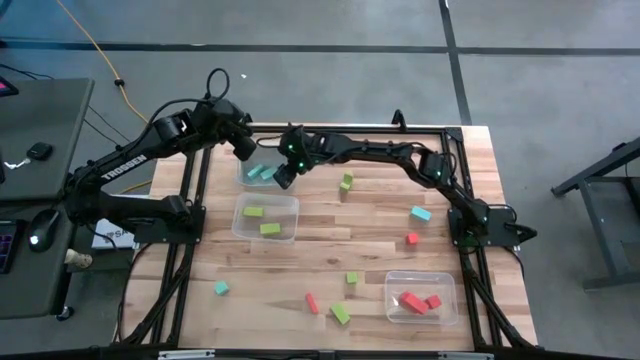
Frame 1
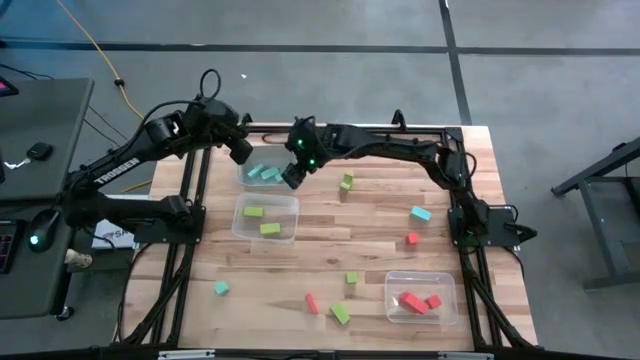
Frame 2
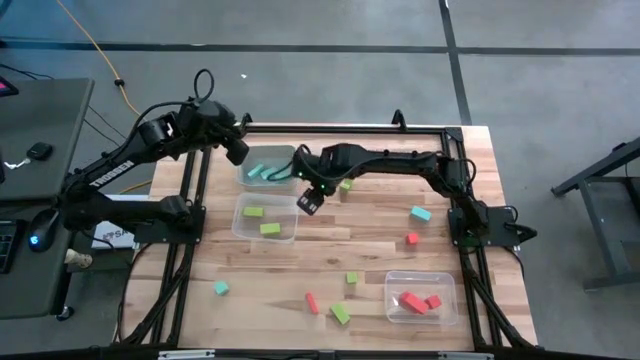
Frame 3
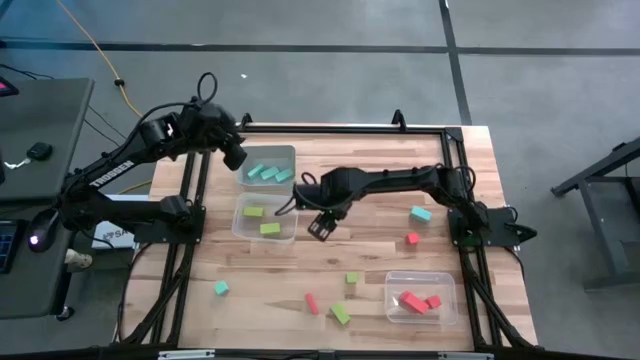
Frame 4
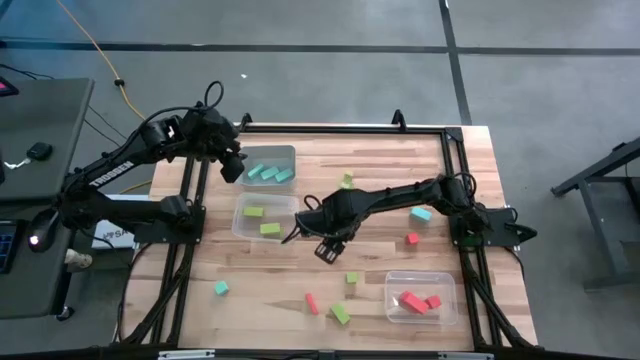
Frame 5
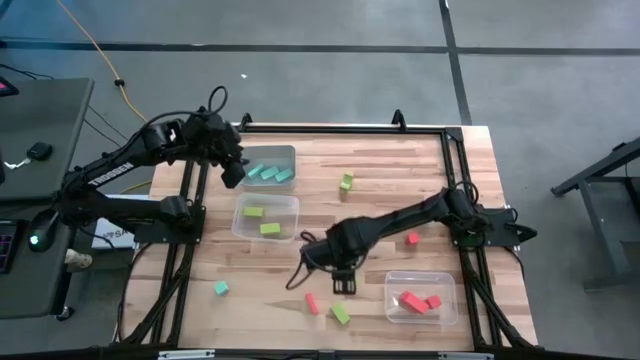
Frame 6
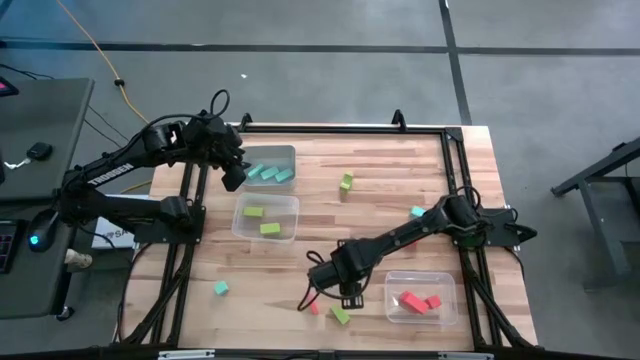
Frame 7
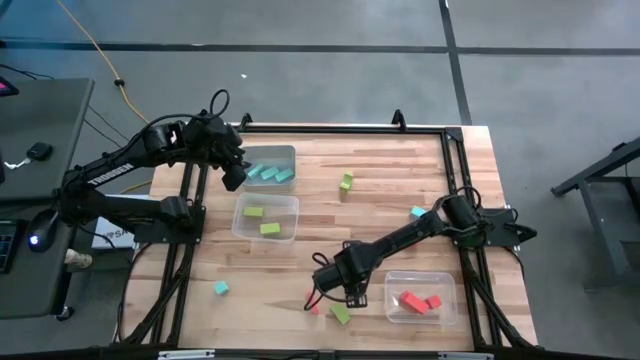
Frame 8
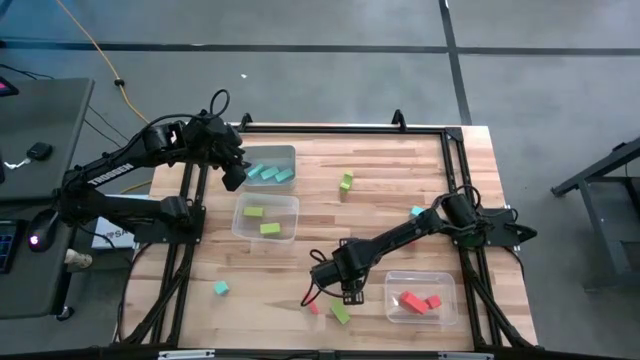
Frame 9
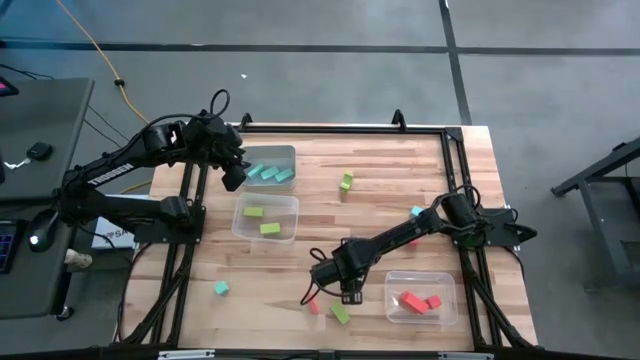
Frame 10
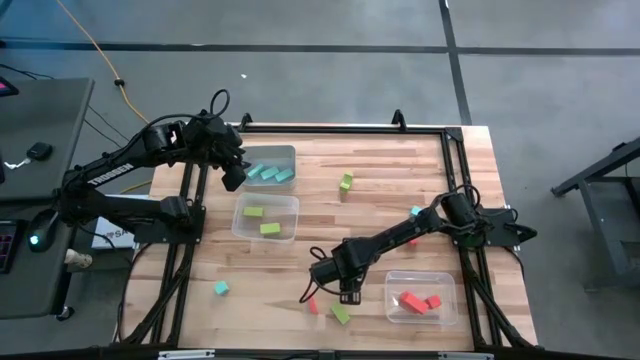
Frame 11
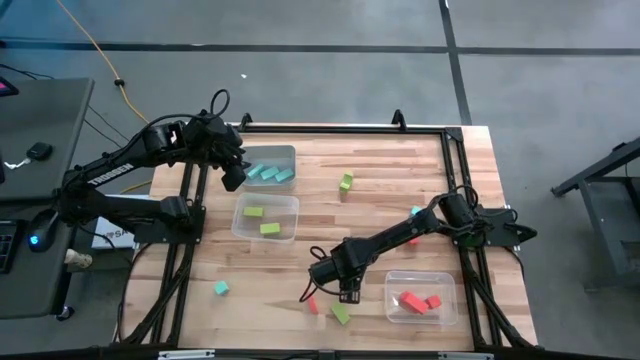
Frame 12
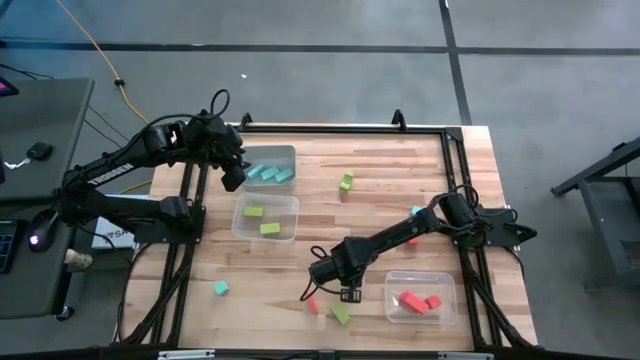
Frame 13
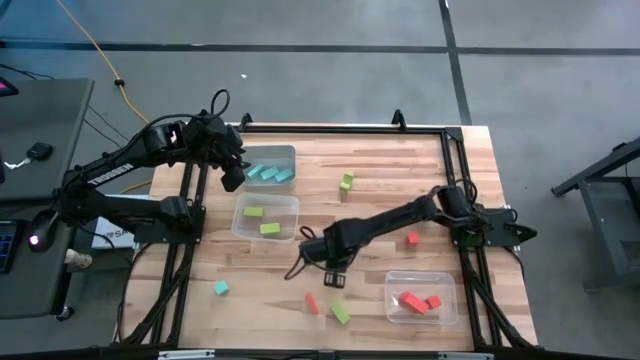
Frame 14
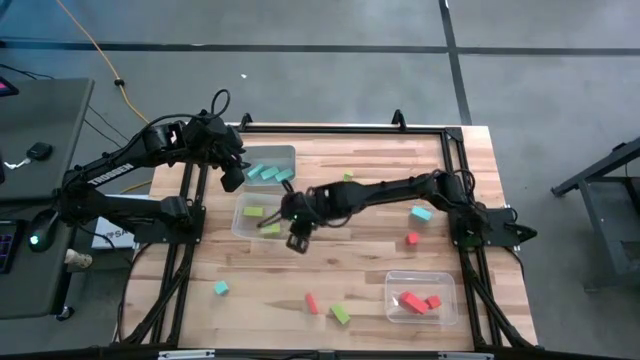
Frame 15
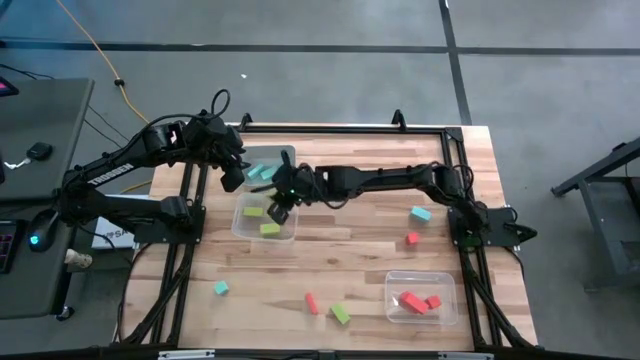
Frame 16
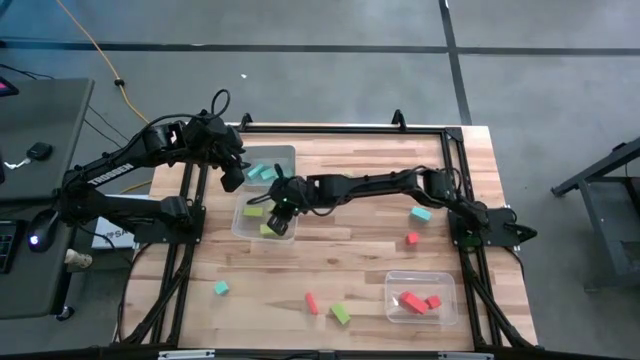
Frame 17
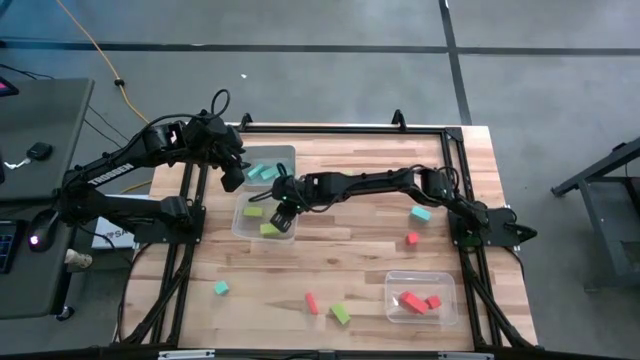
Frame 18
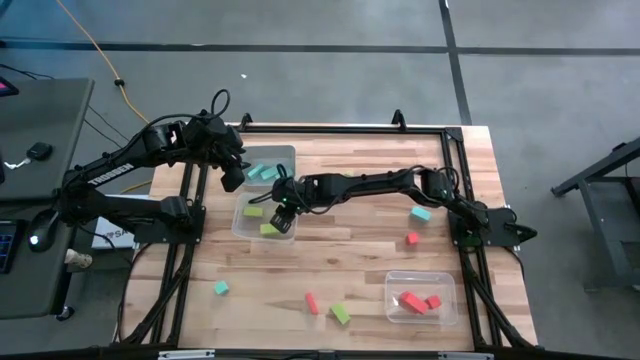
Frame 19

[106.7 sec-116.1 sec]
Task: Sort & place blocks by color
Put the green block into the left transparent bin

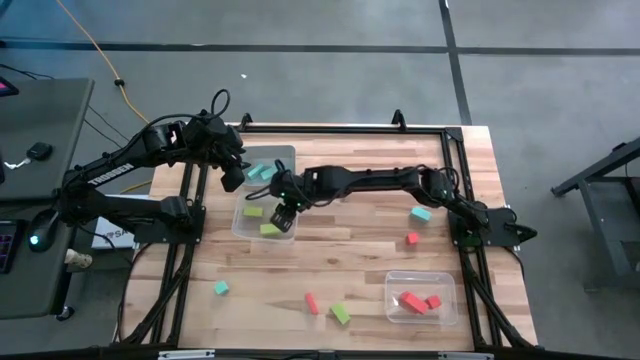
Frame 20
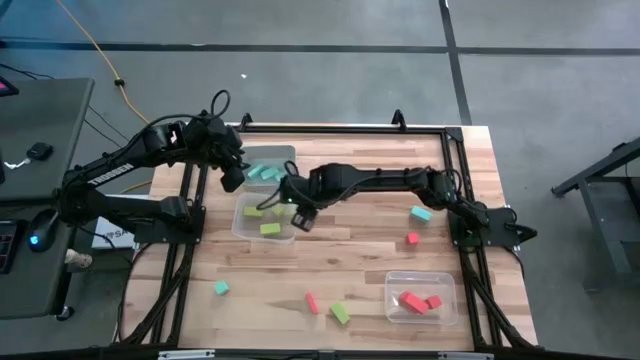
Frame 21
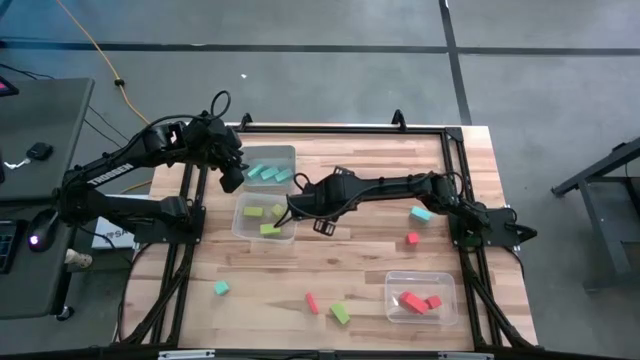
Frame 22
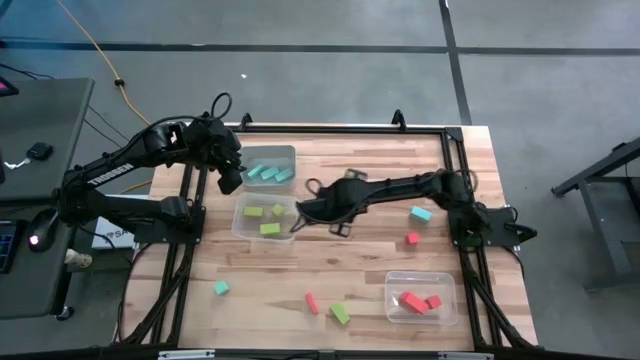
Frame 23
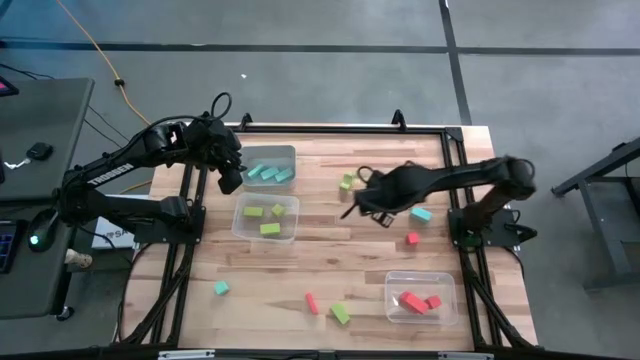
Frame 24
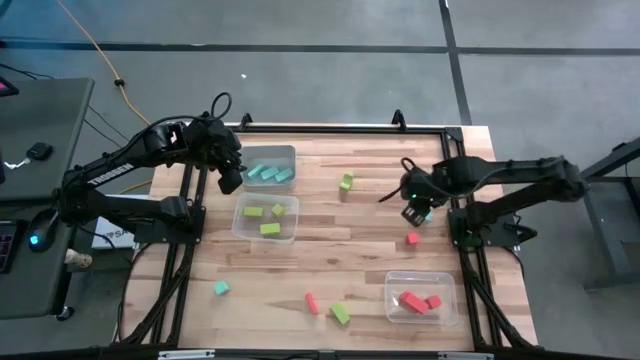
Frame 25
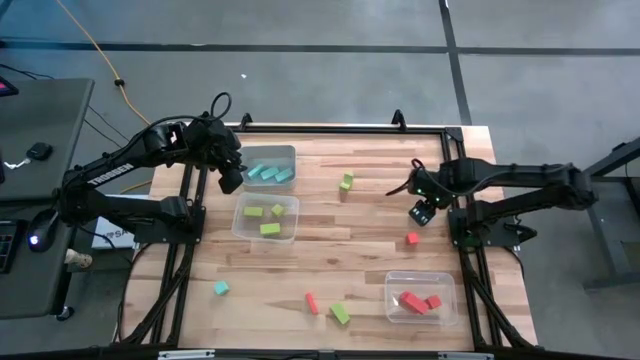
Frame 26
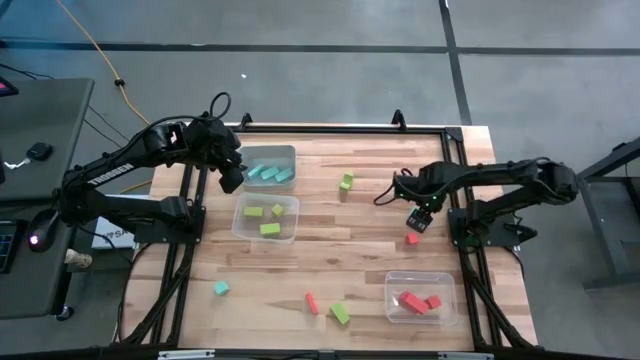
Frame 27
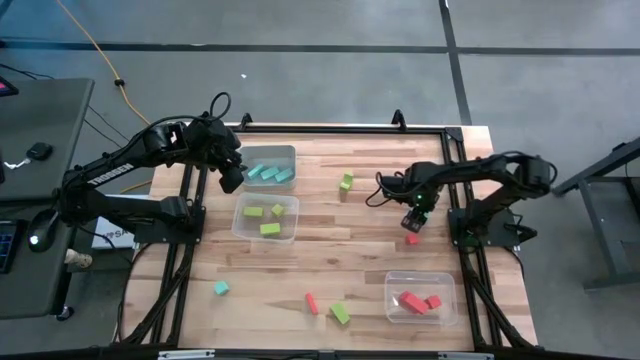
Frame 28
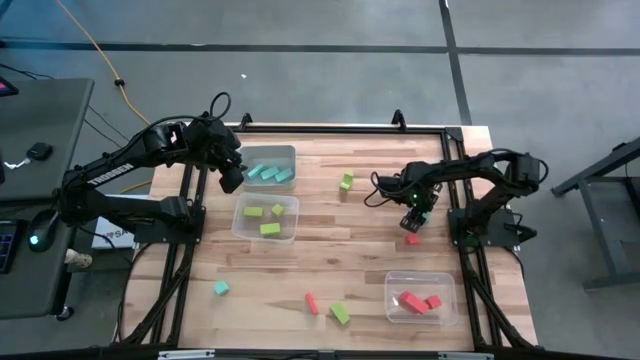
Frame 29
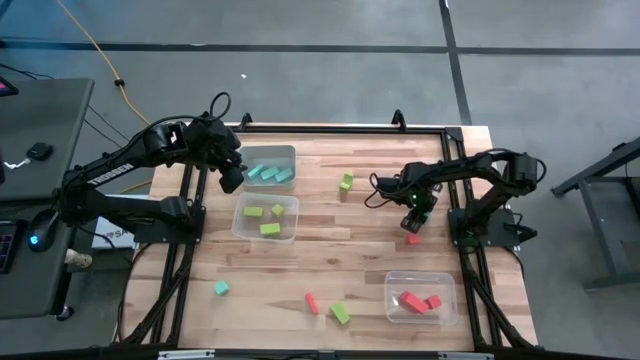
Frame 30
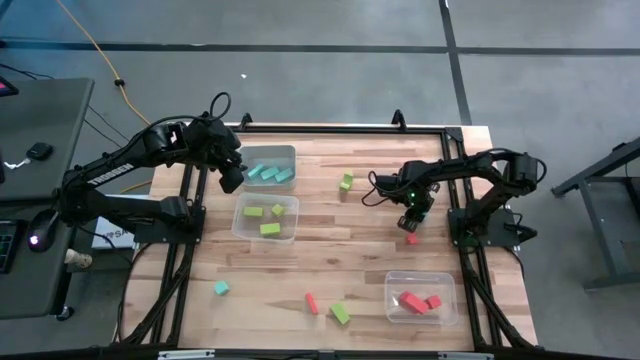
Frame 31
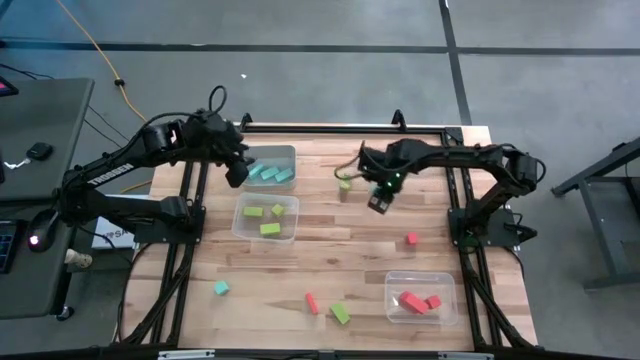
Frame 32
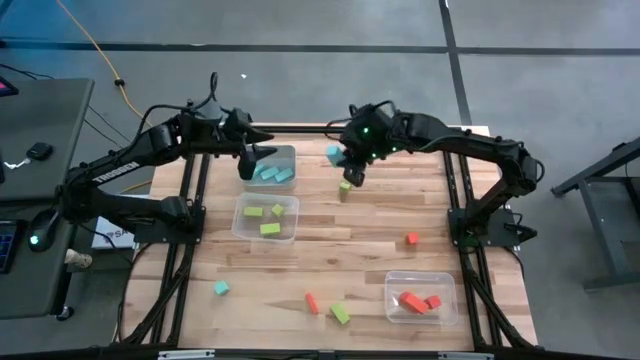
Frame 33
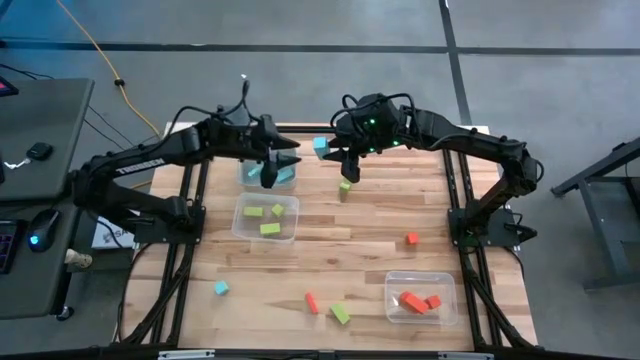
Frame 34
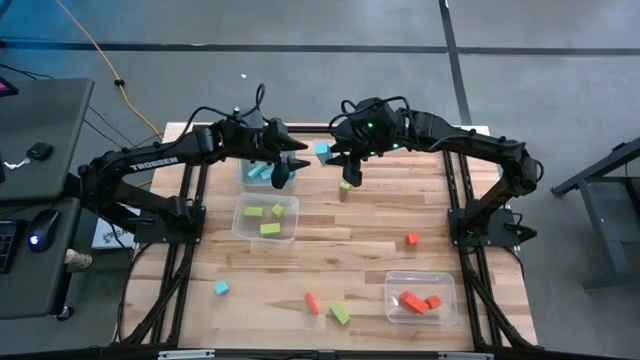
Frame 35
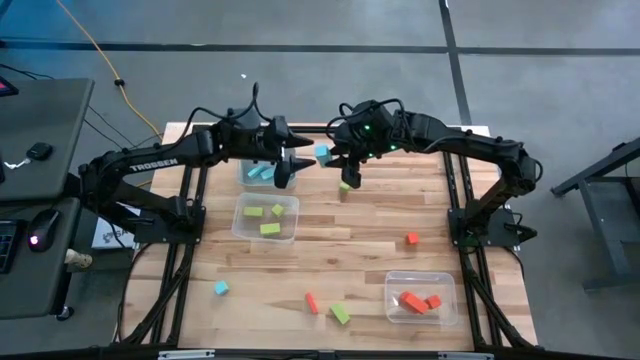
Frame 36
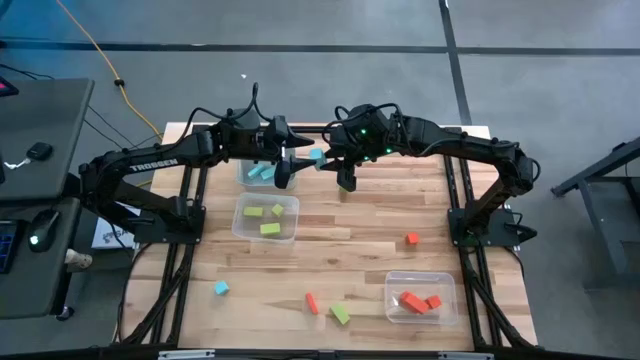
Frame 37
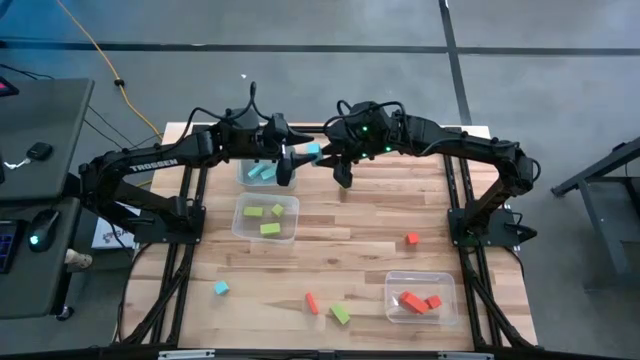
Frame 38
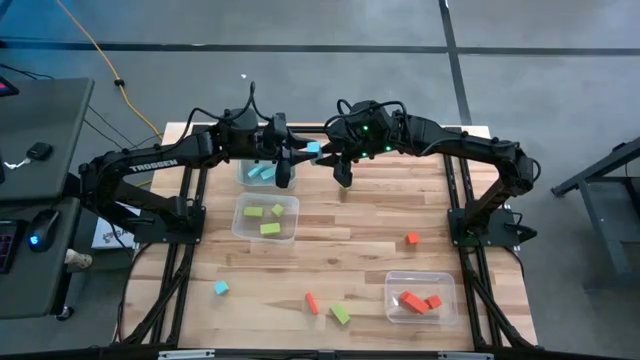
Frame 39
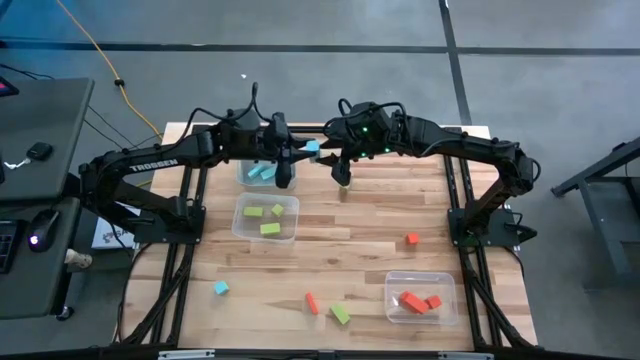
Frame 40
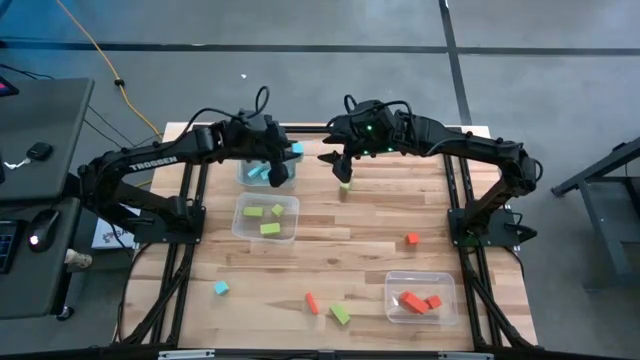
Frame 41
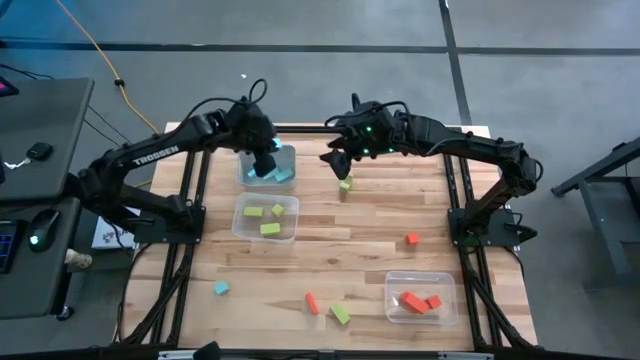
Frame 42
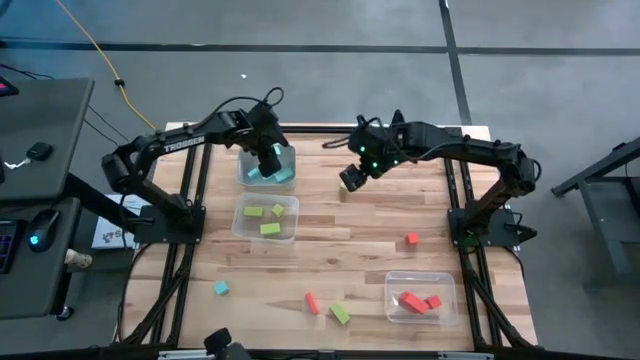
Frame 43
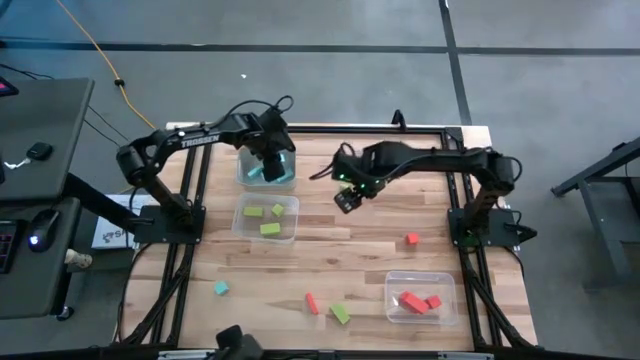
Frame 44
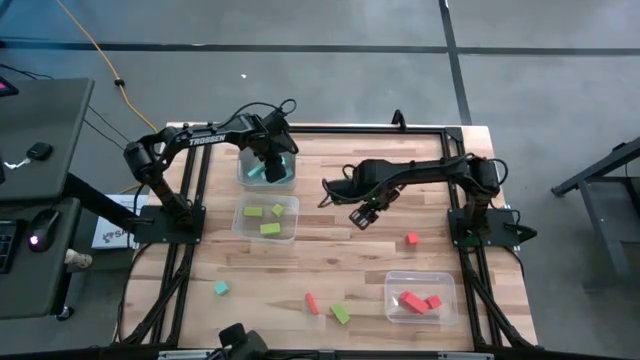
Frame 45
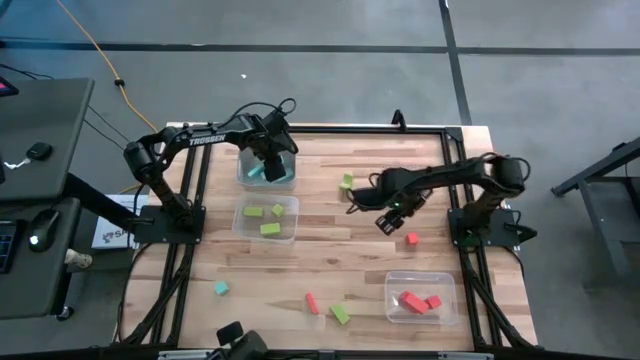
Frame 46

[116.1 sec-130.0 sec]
Put the blue block into the gray bin
